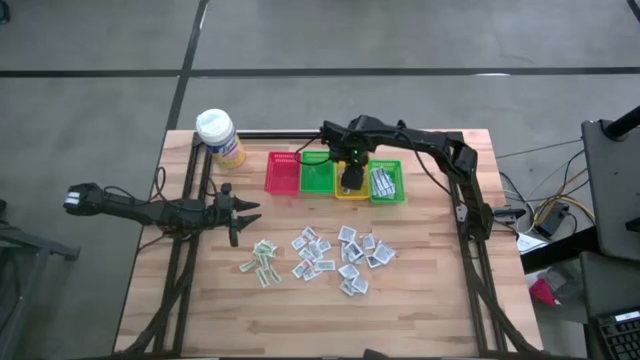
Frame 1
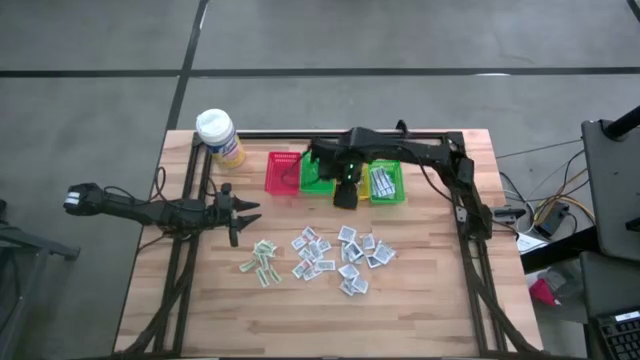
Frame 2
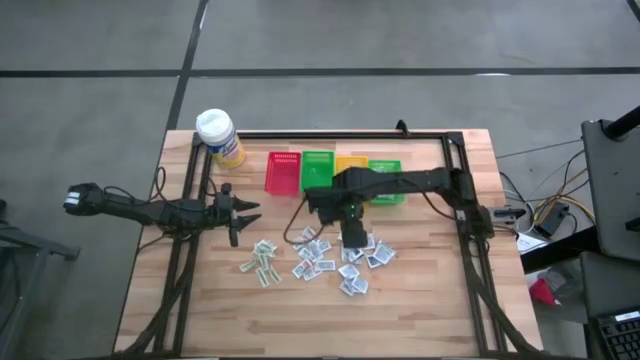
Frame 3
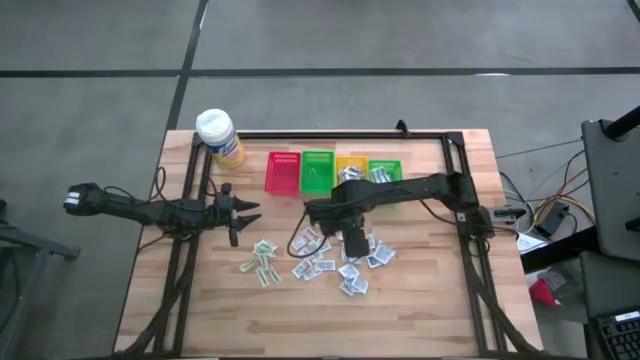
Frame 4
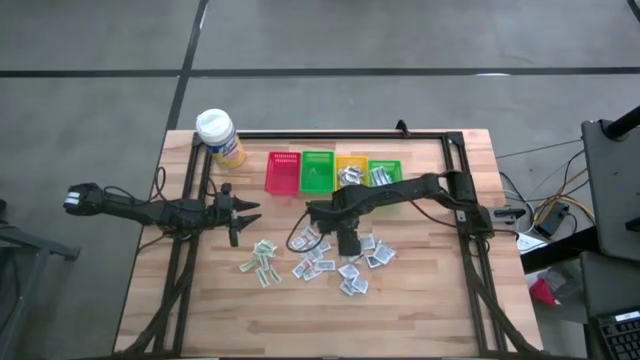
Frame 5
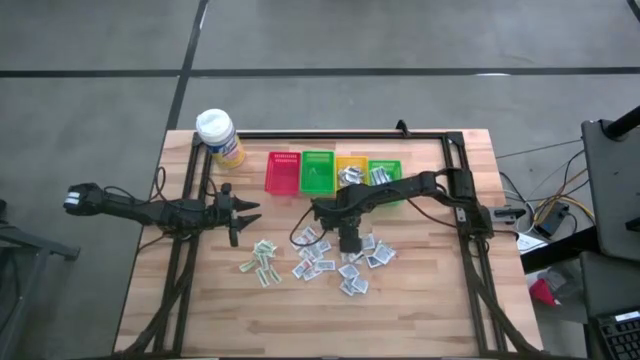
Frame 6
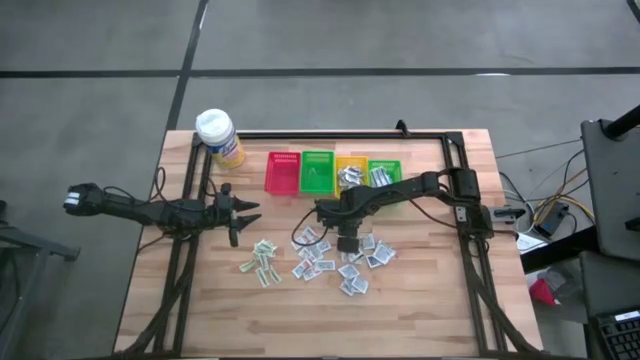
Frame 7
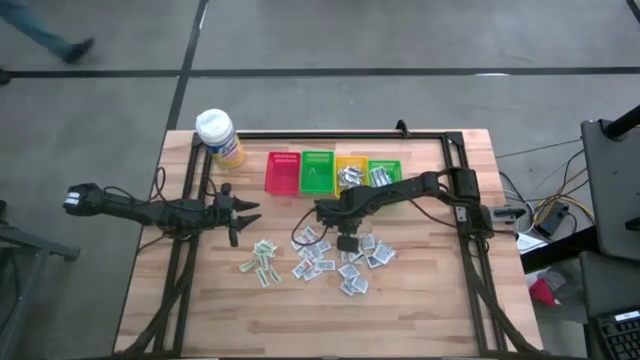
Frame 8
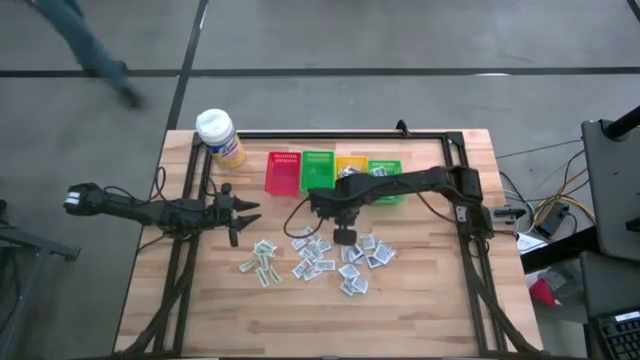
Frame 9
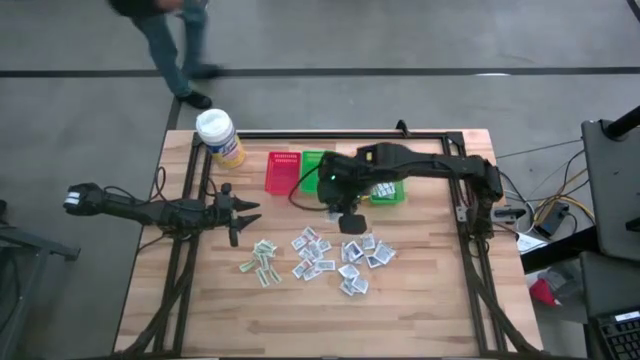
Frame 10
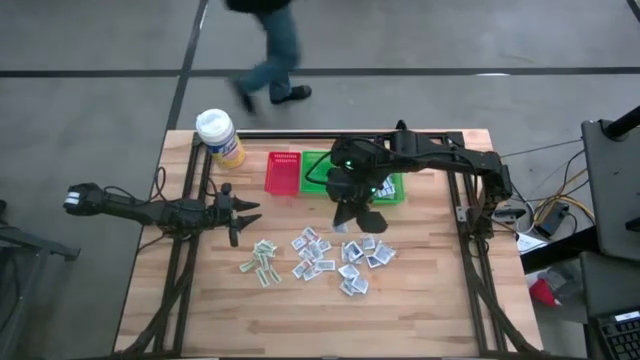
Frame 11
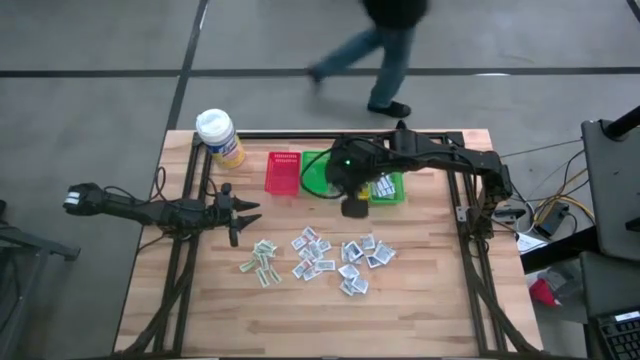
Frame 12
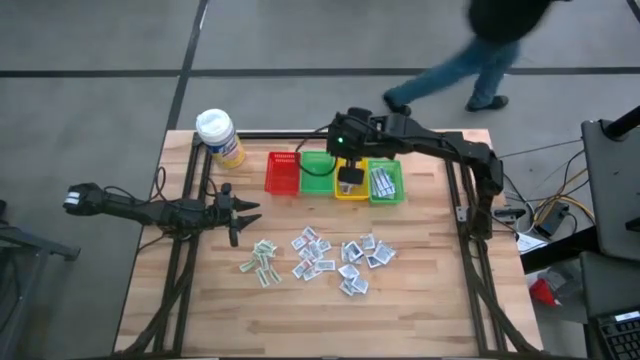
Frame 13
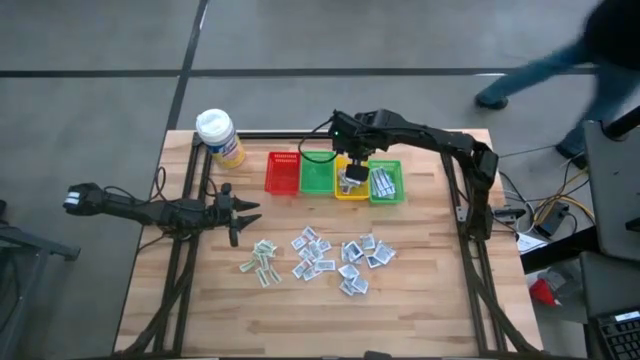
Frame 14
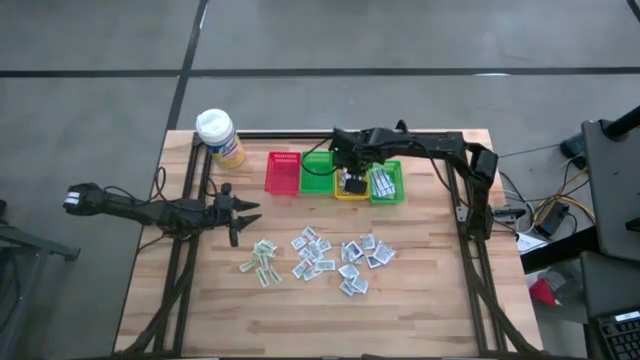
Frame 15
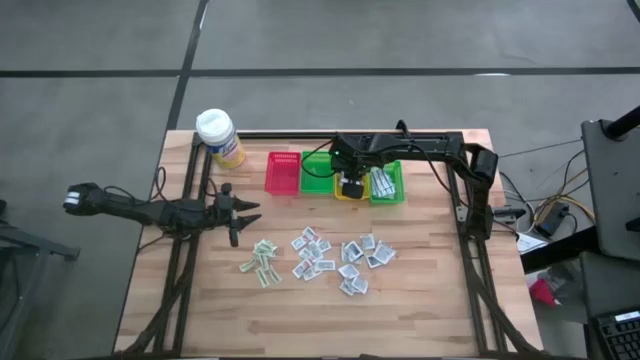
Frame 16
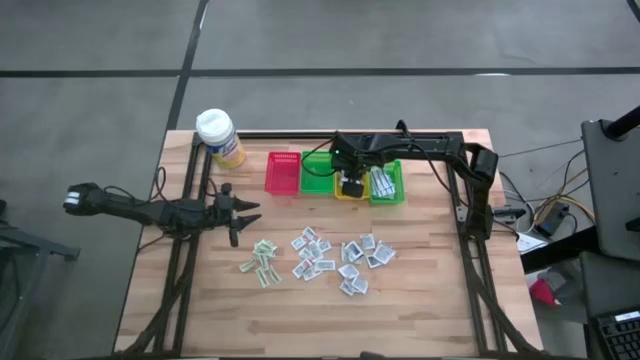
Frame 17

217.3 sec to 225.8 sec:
Task: Pick & Place First Aid Supplies
Put the blue alcohol pad into the yellow bin

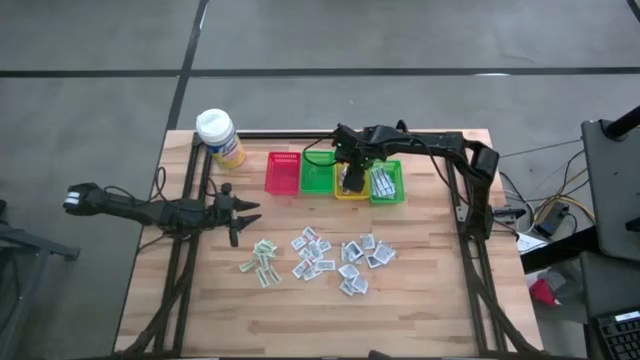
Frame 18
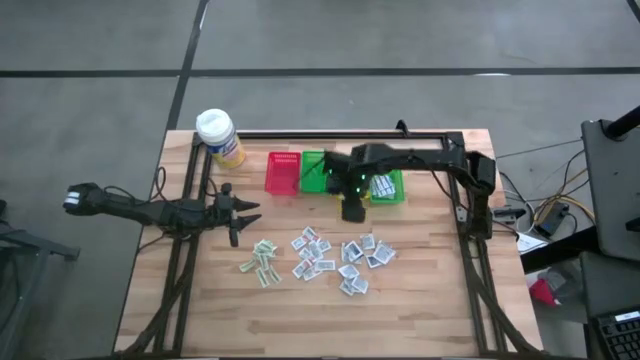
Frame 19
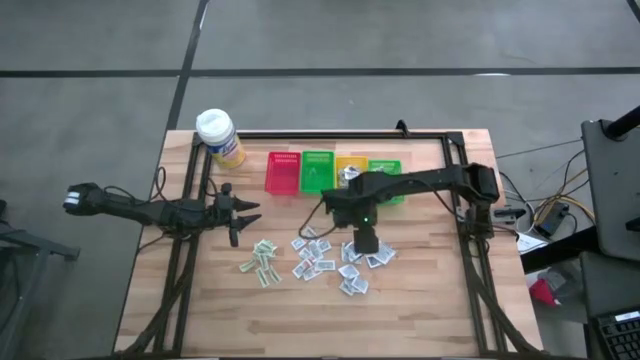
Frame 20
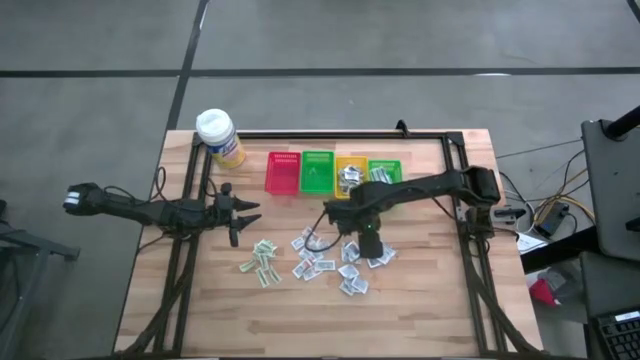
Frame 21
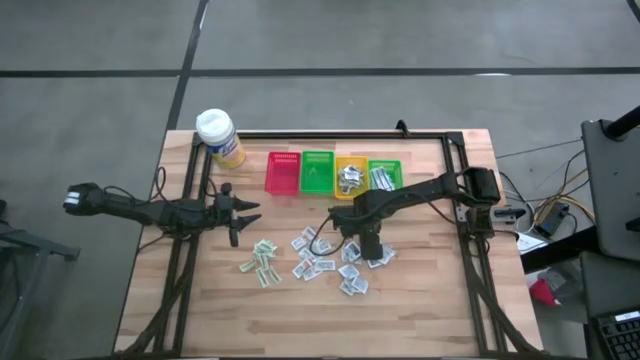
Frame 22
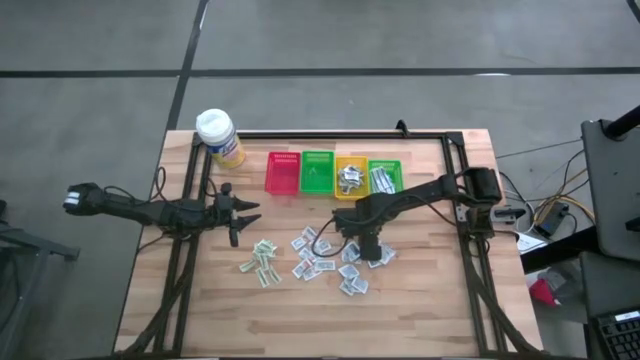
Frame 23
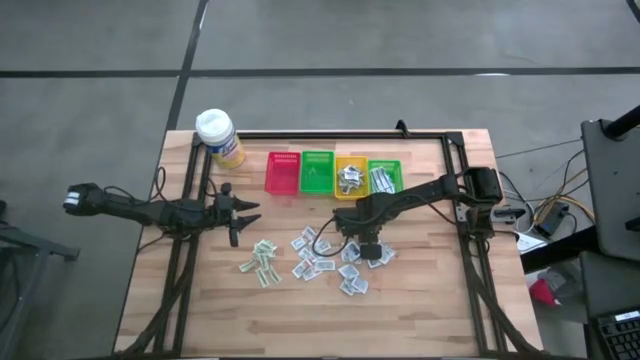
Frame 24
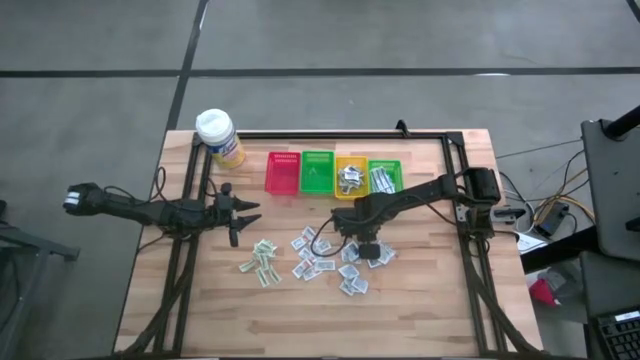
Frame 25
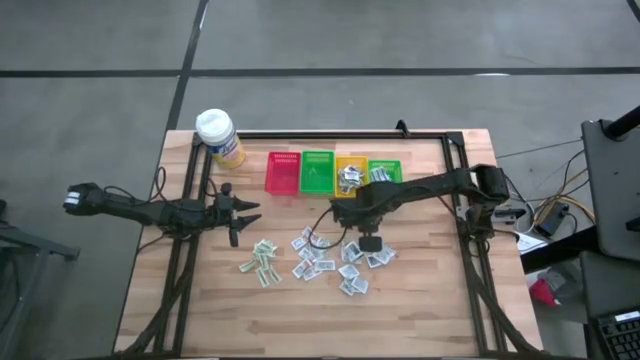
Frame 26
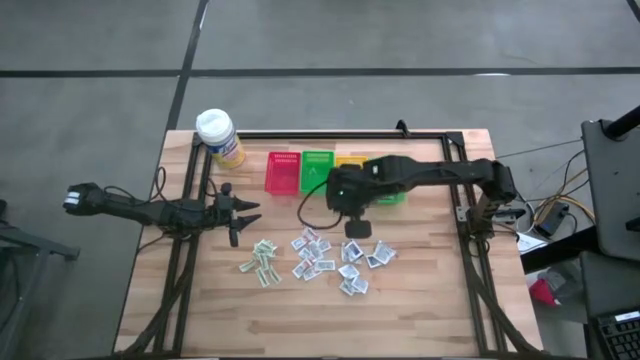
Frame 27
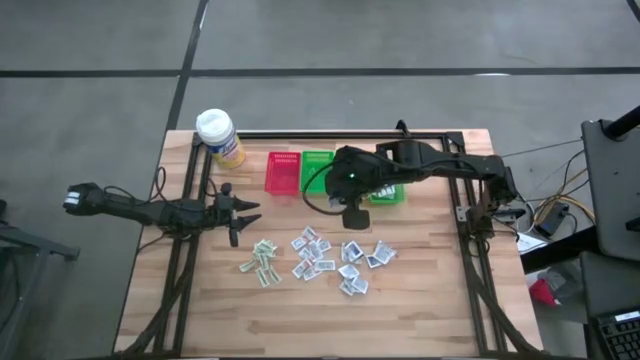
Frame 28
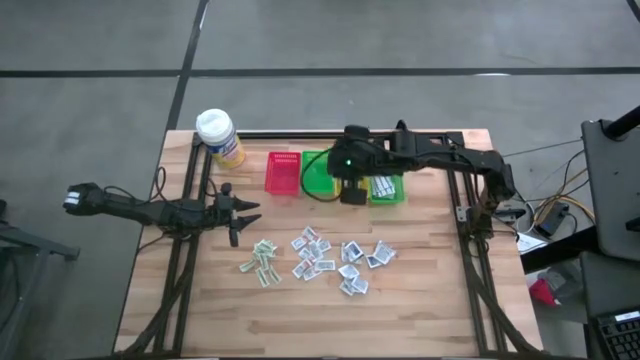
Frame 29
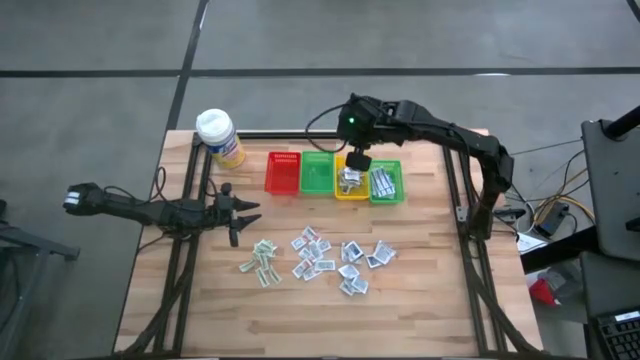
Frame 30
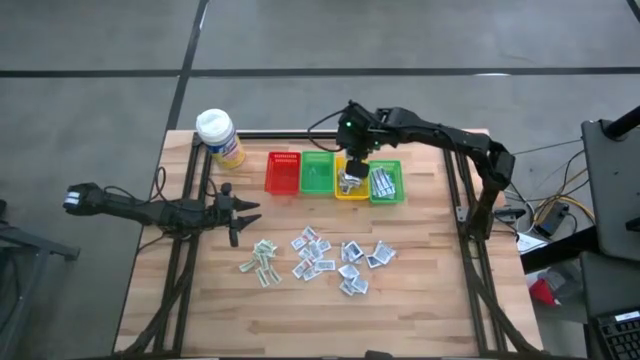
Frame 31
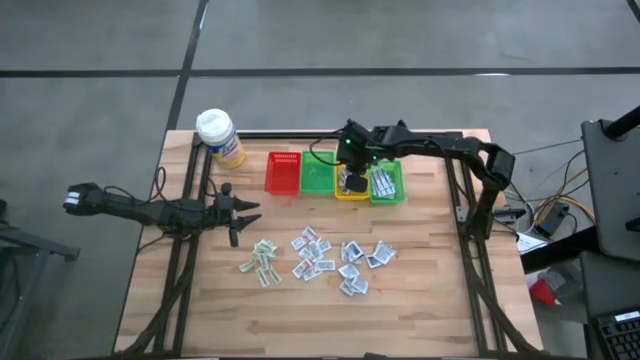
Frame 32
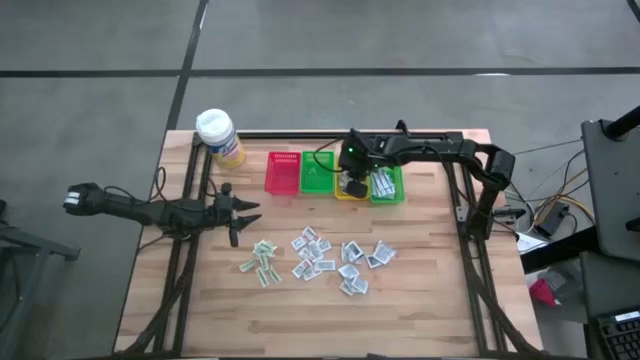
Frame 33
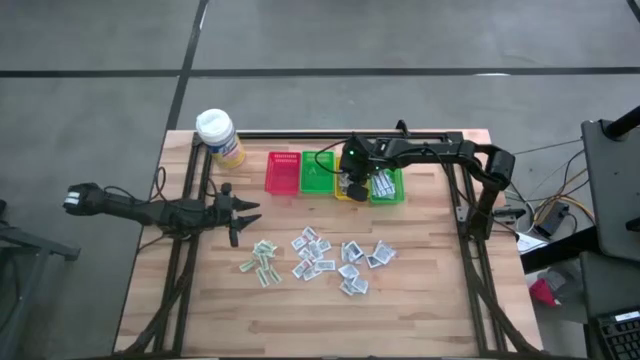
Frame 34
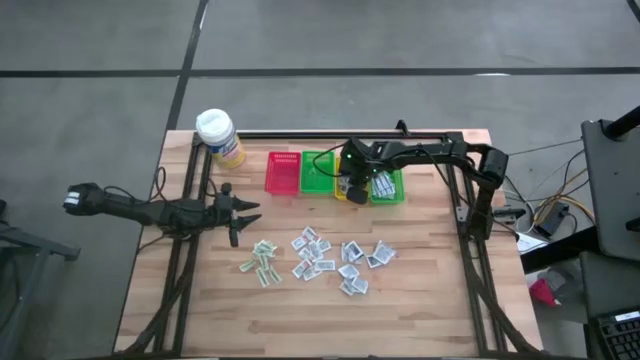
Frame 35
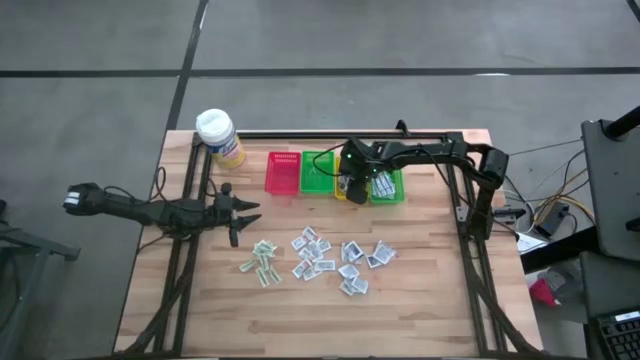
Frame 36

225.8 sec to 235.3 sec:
Put the blue alcohol pad into the yellow bin

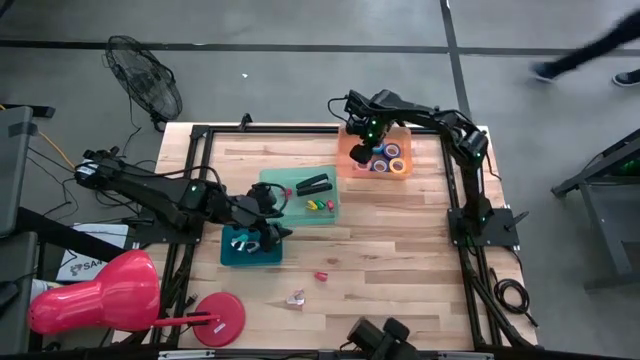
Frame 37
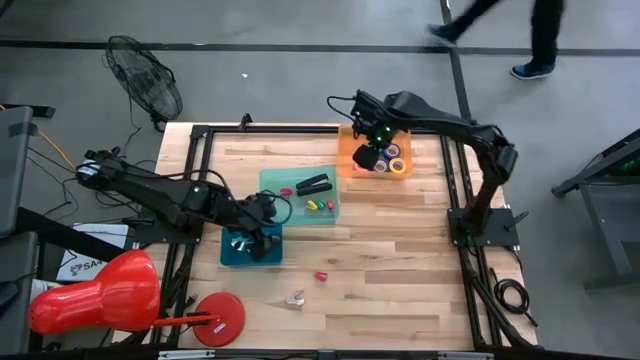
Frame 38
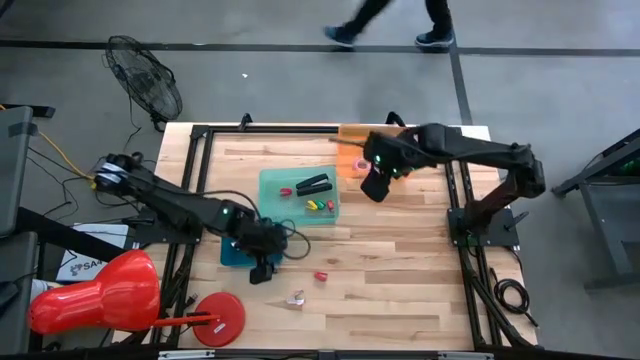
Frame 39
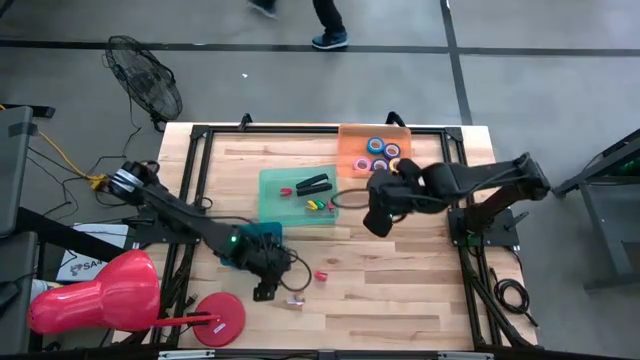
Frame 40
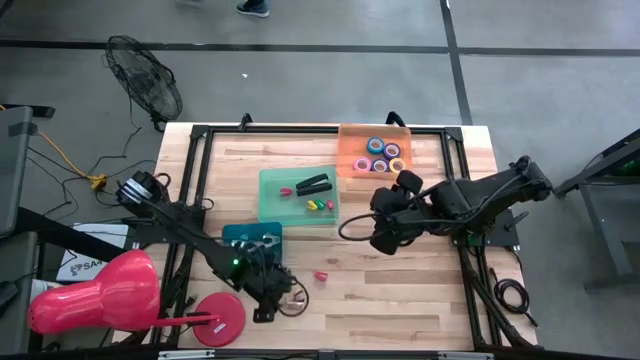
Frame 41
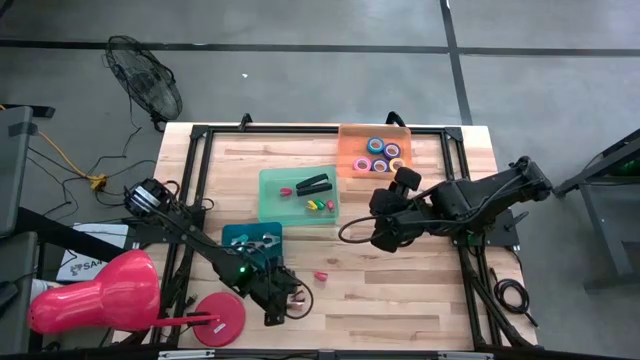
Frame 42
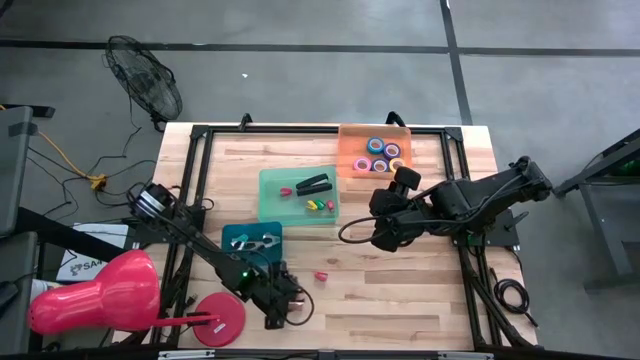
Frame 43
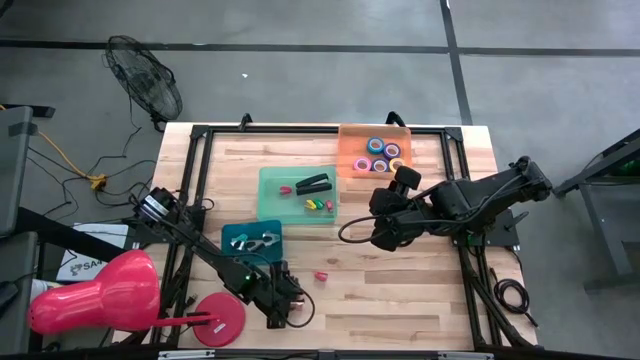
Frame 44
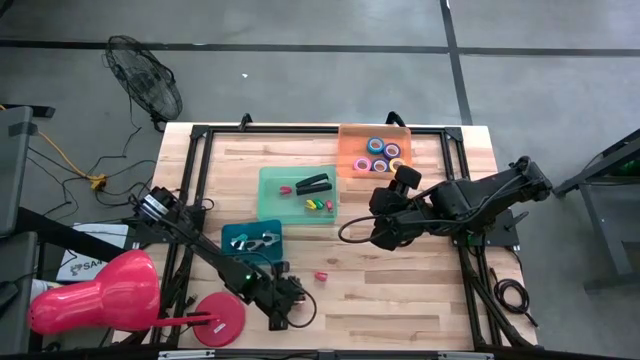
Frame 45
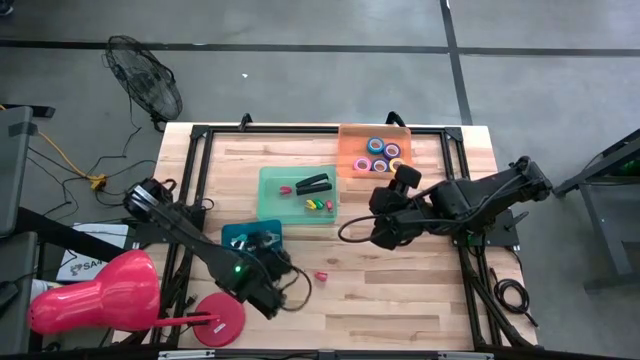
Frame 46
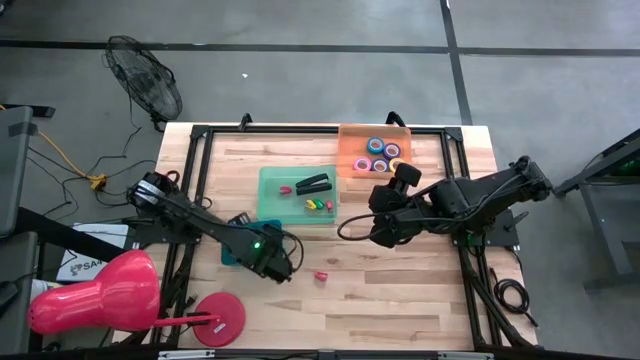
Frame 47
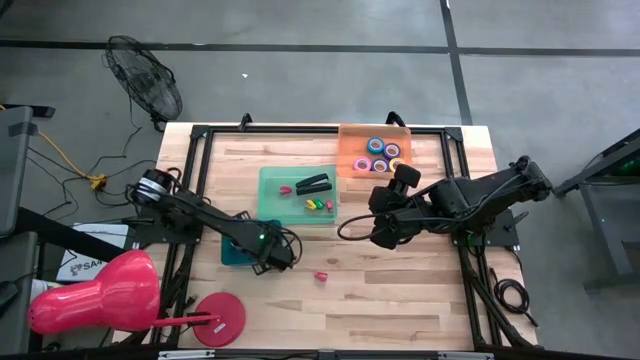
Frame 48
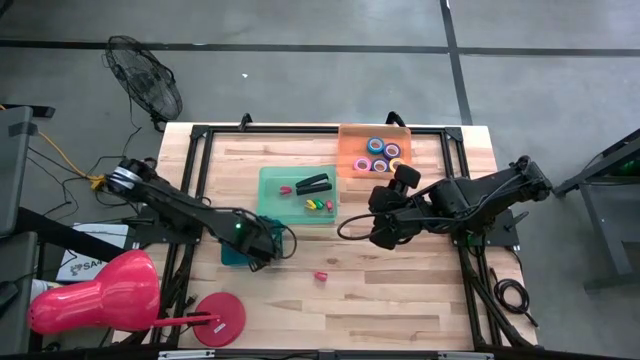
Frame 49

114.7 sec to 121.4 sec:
Task: Pick and place Stapler, Stapler remover, tape
Put the pink staple remover in the blue bin
